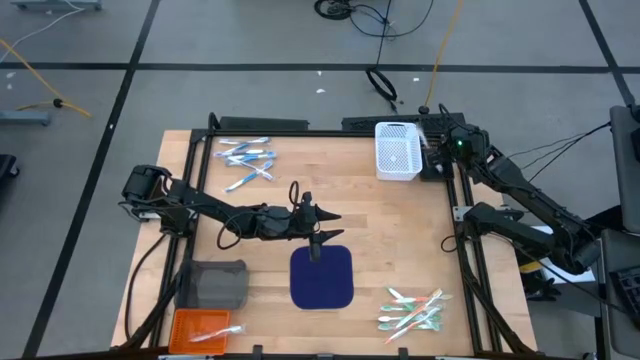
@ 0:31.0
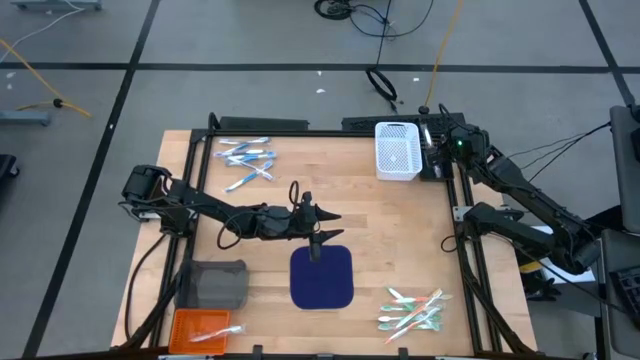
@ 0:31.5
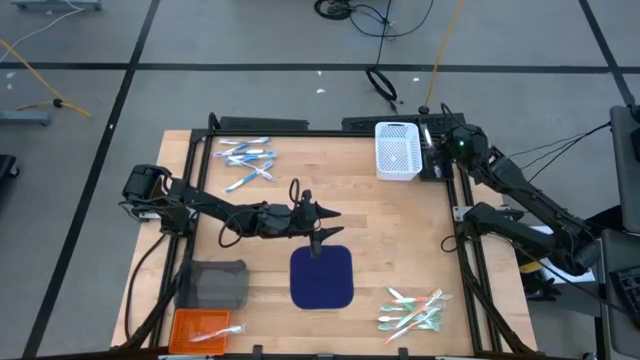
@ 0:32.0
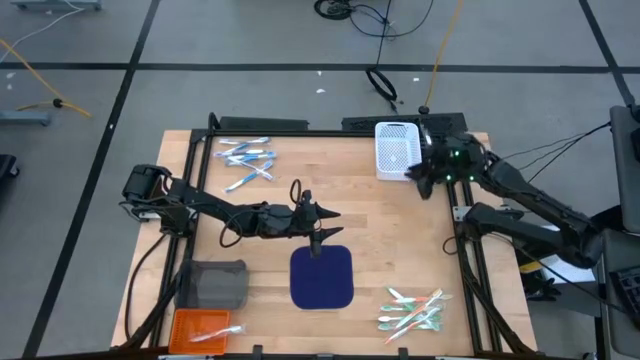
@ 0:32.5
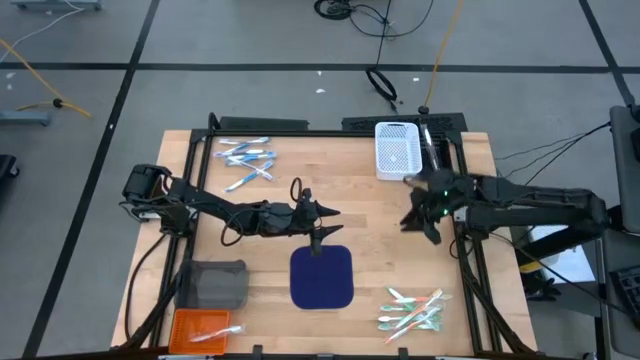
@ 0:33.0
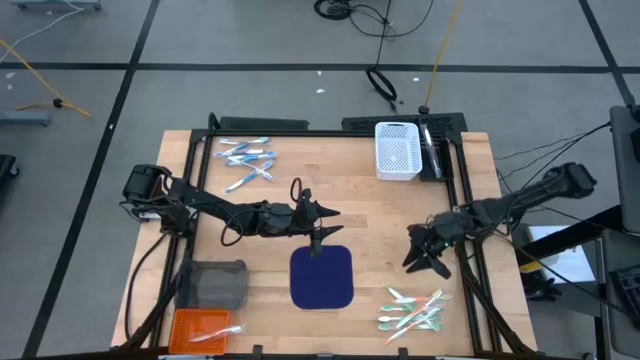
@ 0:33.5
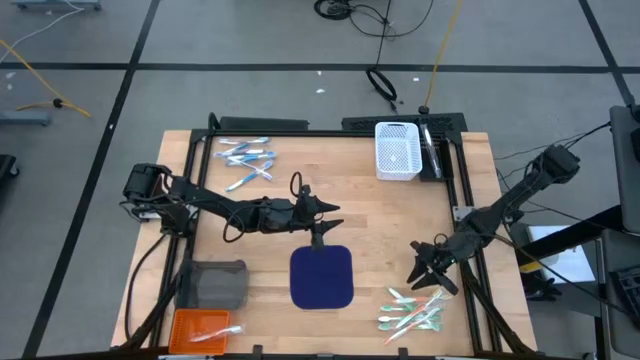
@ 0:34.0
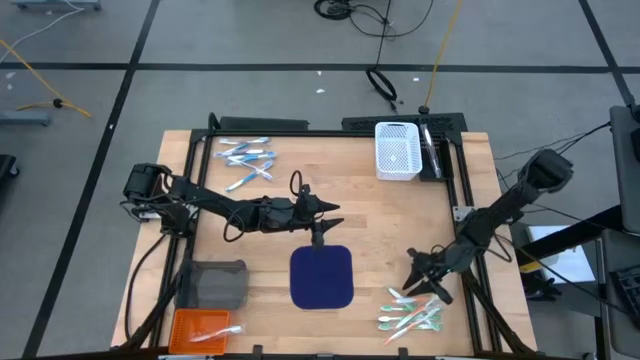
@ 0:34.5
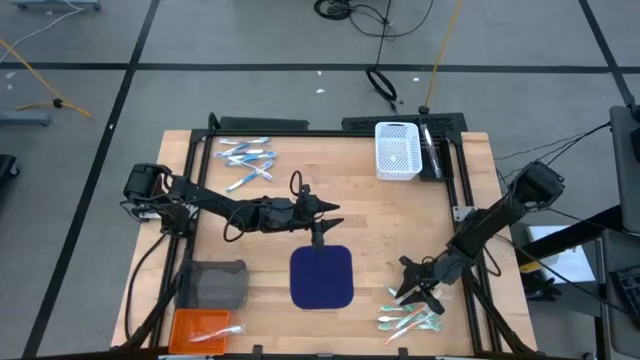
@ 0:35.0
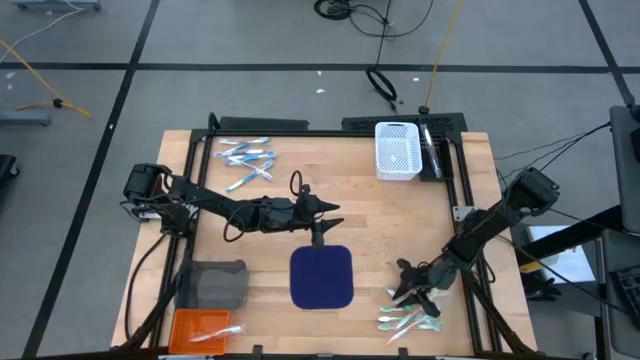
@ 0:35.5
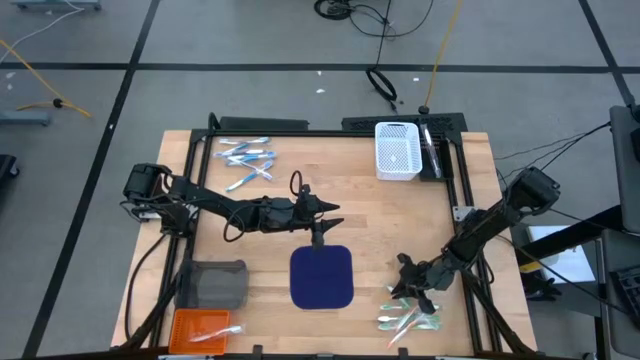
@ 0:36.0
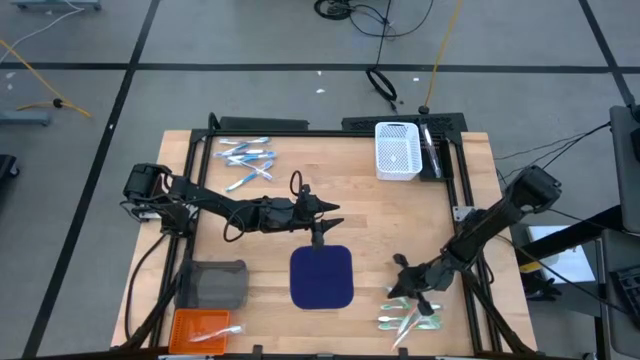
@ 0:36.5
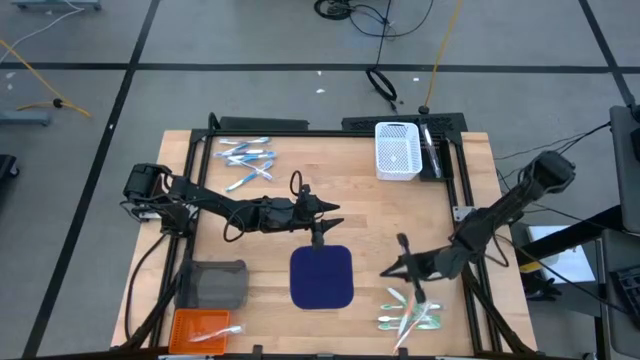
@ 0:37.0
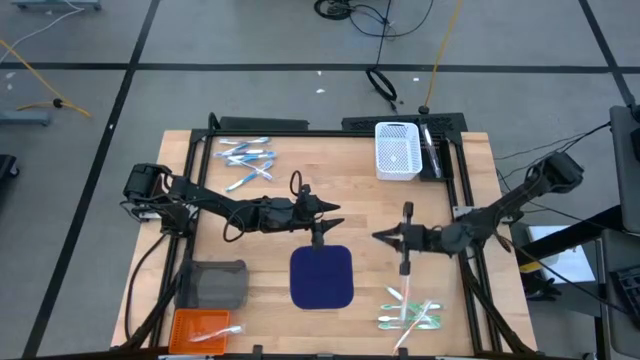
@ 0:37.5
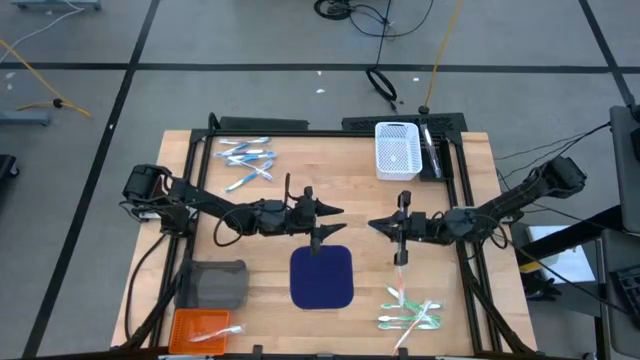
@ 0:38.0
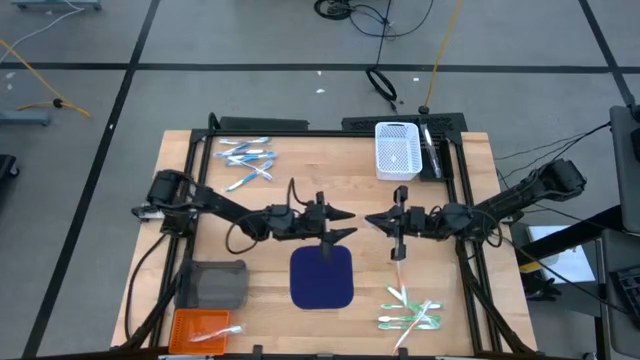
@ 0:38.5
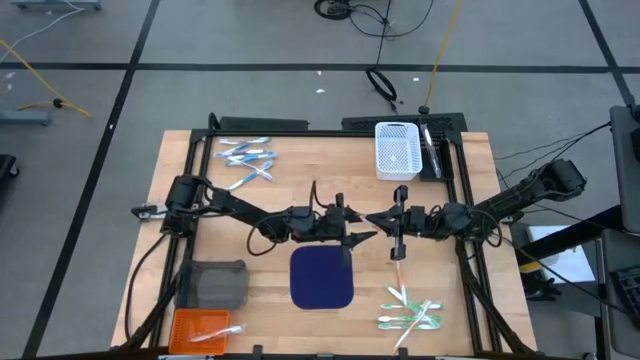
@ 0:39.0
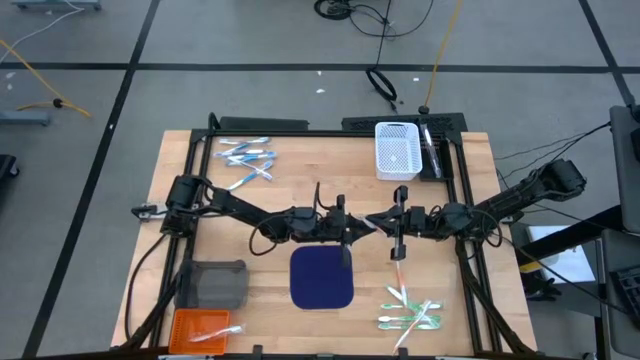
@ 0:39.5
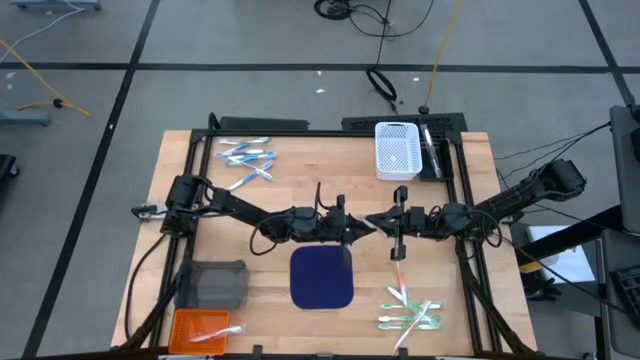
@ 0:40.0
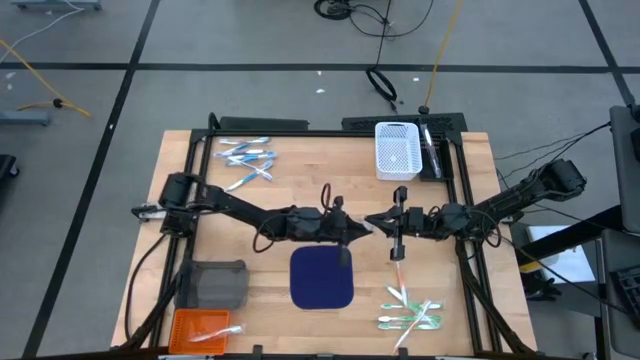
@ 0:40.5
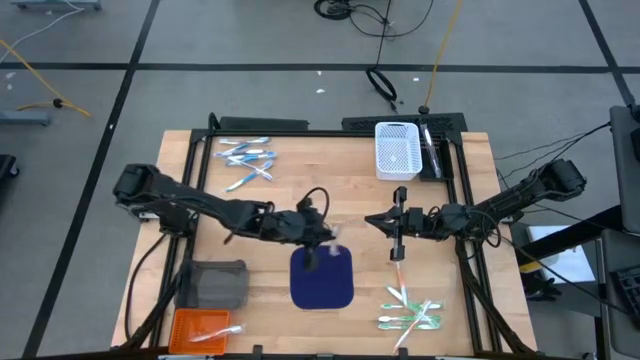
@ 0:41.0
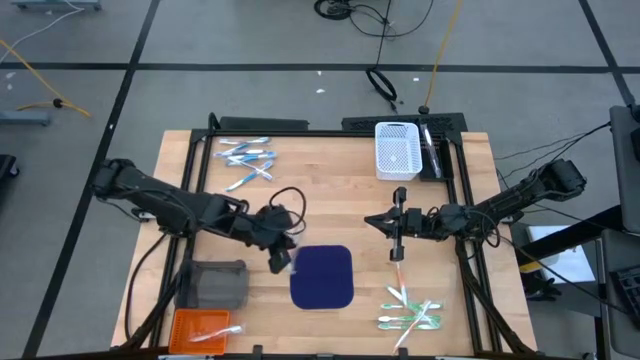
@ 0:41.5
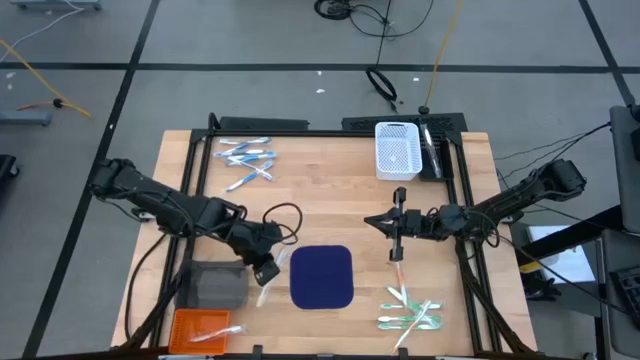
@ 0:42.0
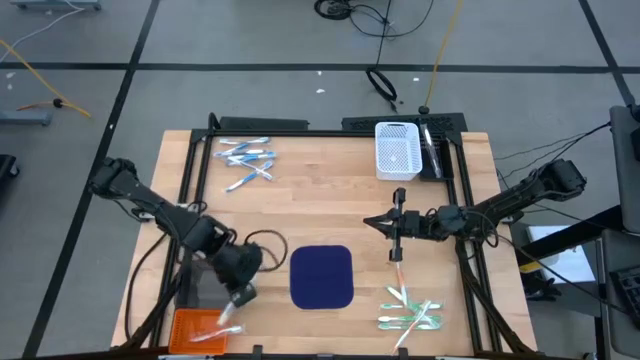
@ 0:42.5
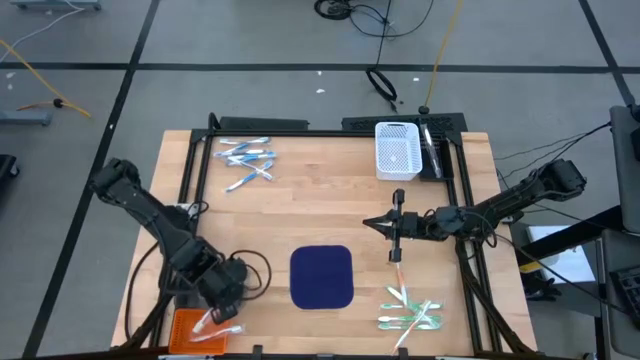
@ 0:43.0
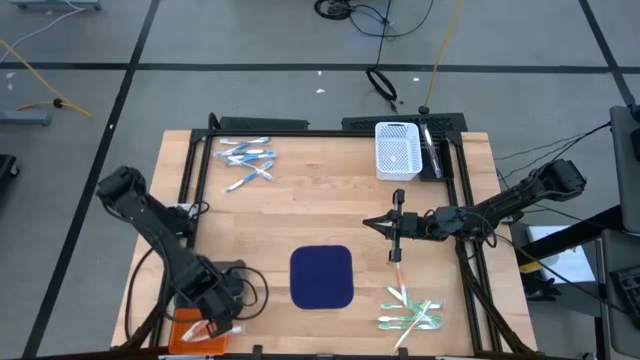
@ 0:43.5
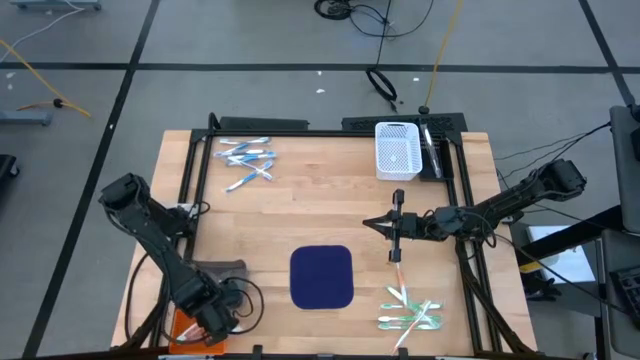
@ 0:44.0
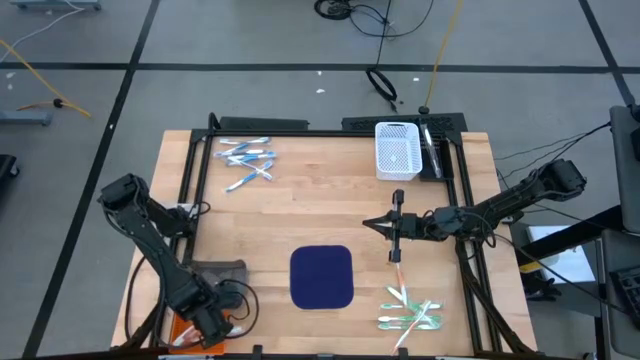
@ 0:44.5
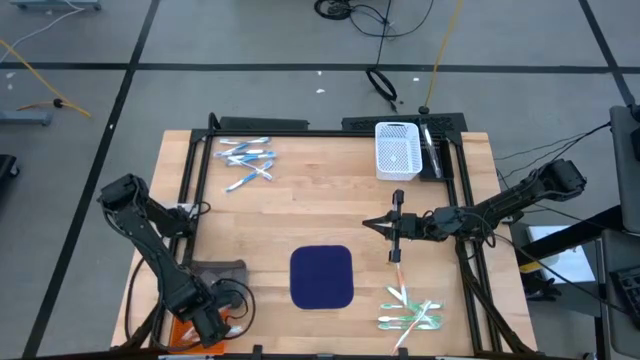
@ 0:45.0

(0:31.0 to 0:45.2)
Task: Pick & Place Toothbrushes
Put the orange toothbrush into the orange basket

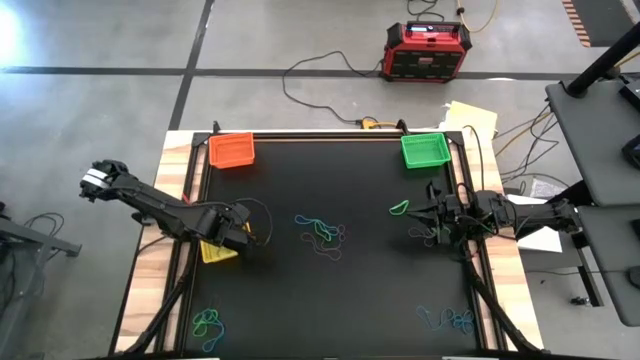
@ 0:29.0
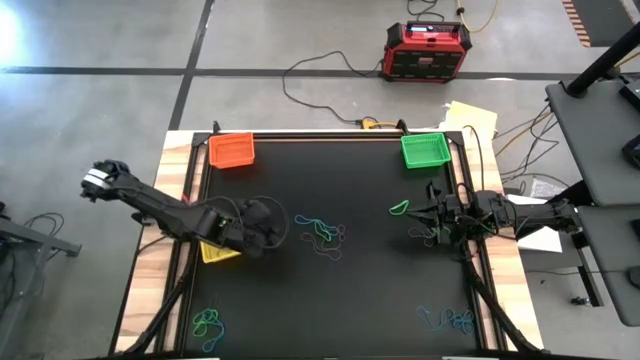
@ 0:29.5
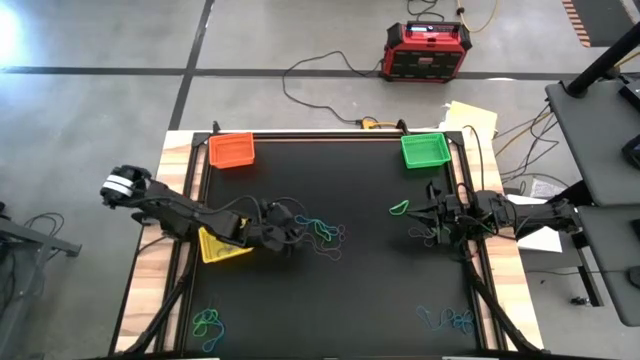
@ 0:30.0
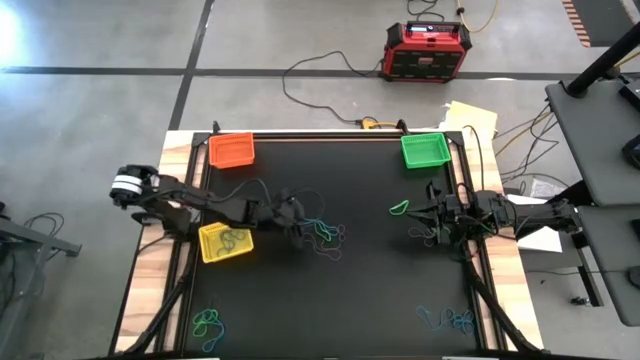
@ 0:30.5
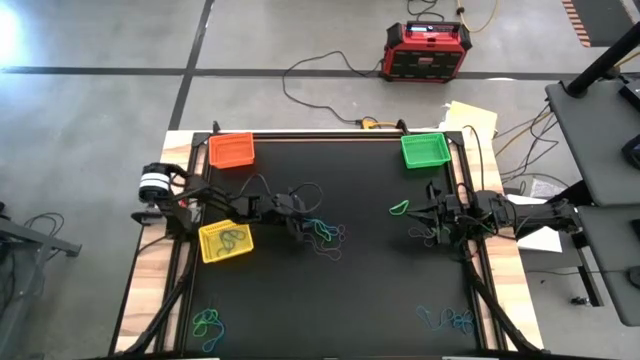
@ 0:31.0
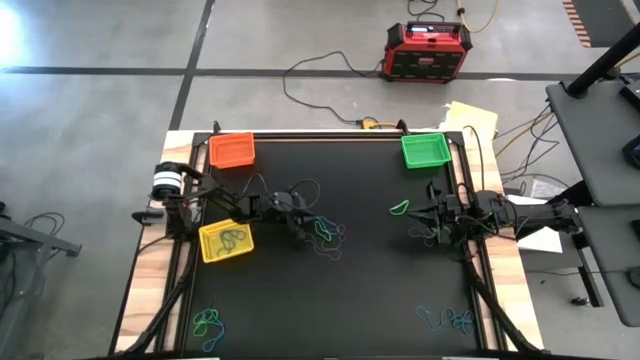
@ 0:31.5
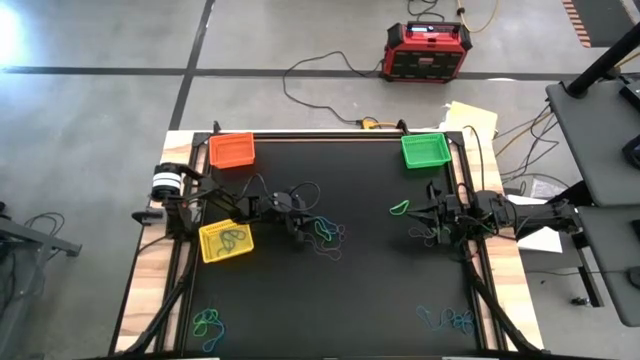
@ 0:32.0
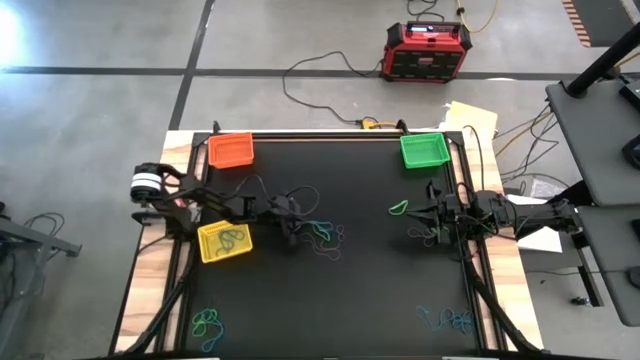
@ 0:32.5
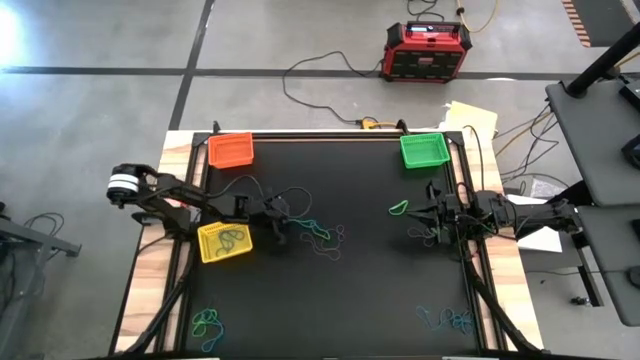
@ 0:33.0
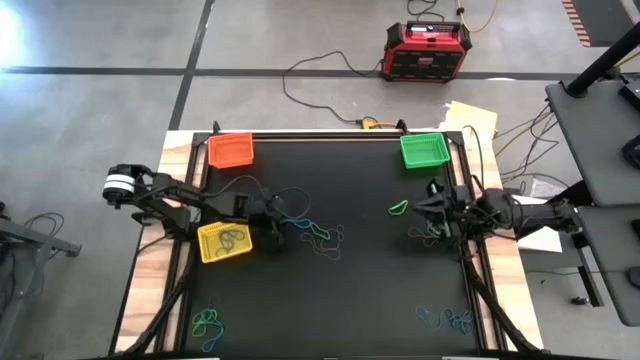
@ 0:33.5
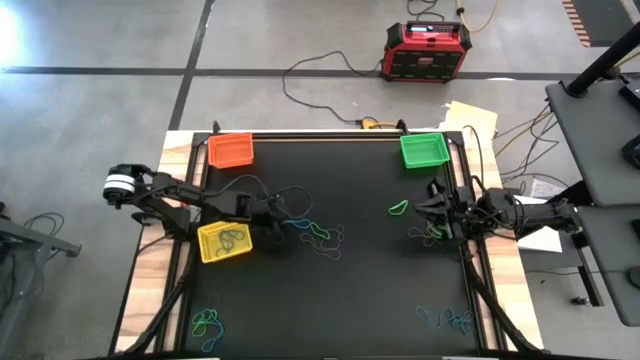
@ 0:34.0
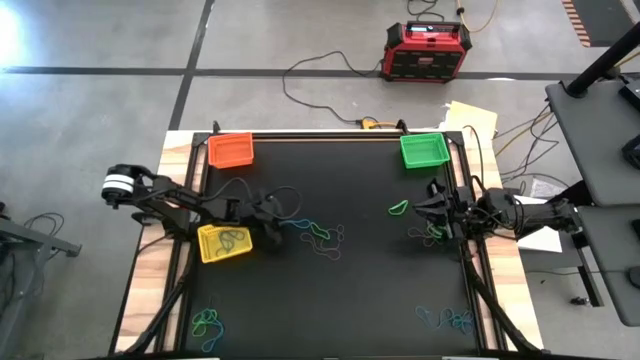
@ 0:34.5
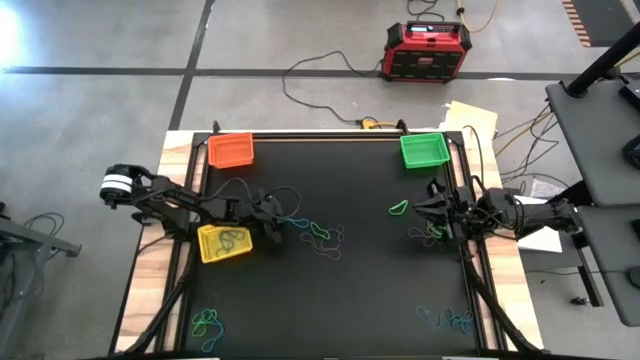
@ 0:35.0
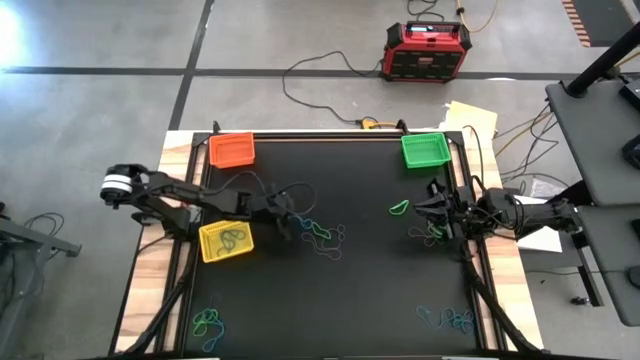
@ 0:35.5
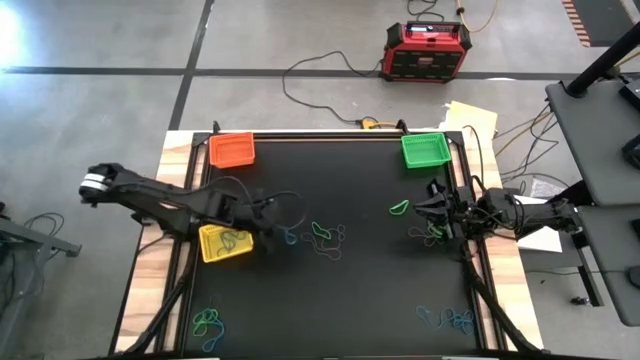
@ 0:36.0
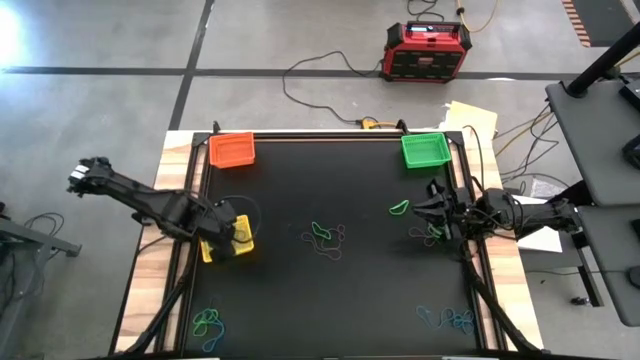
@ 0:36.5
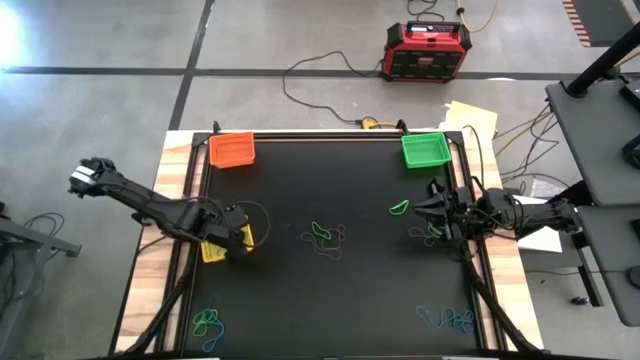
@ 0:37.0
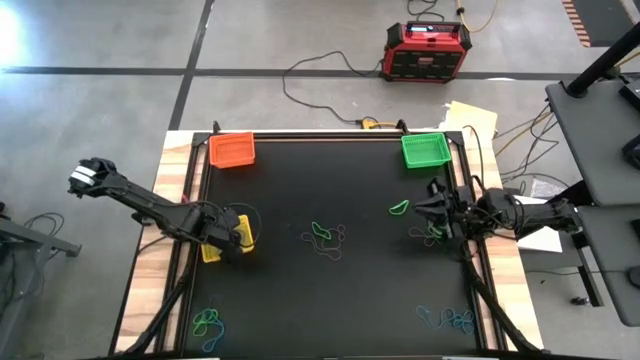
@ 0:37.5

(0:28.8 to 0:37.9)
Task: Sort rubber bands into baskets
Put the blue rubber band into the yellow bin
